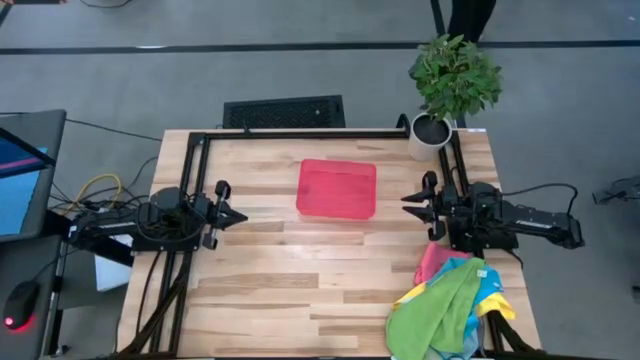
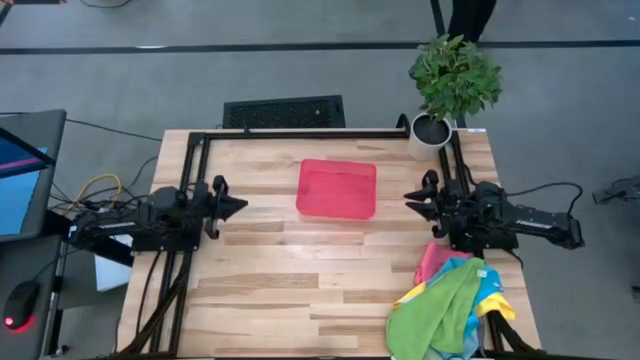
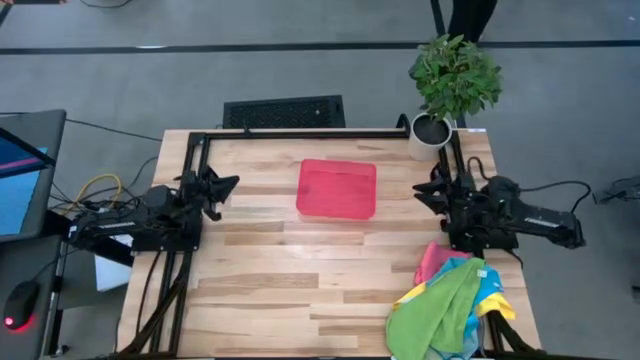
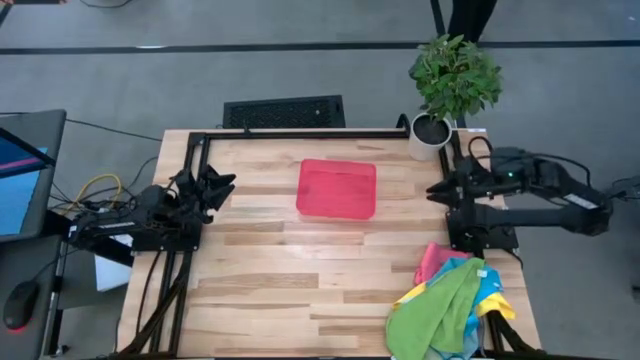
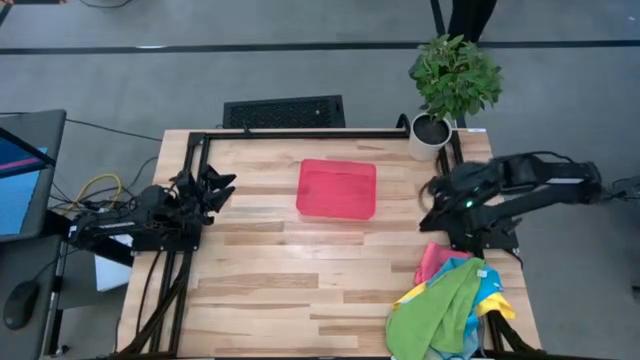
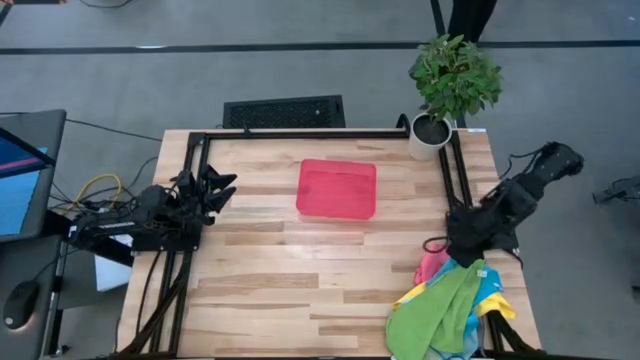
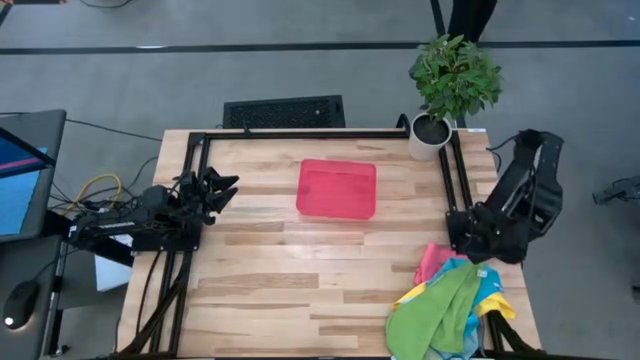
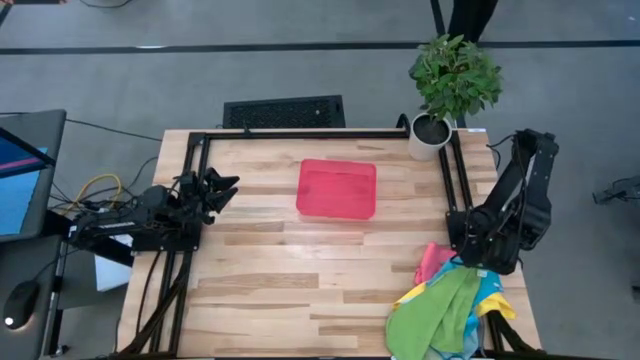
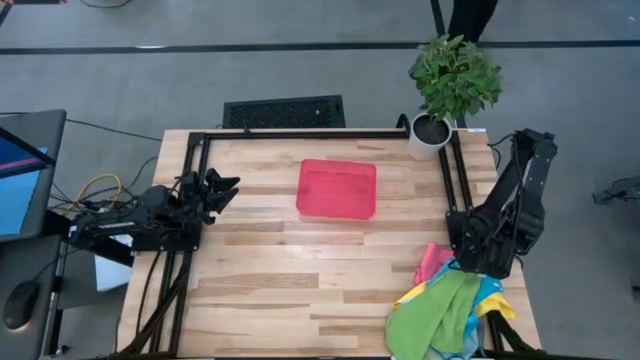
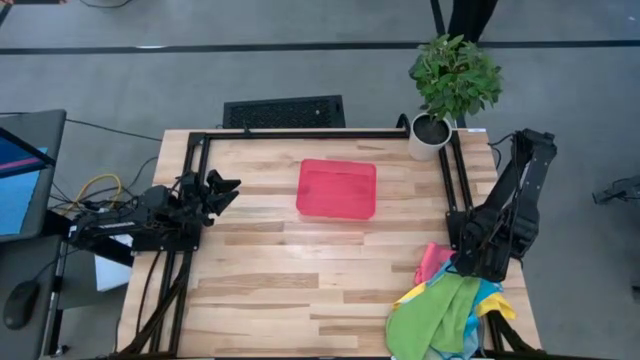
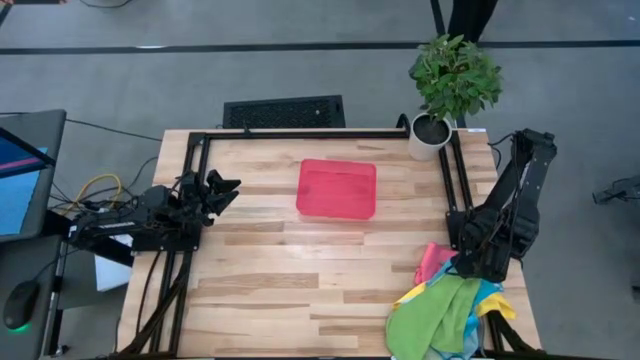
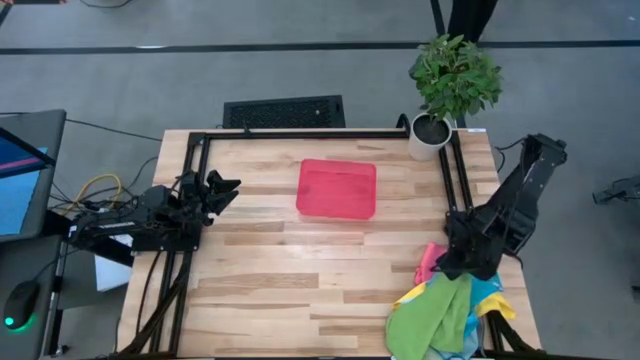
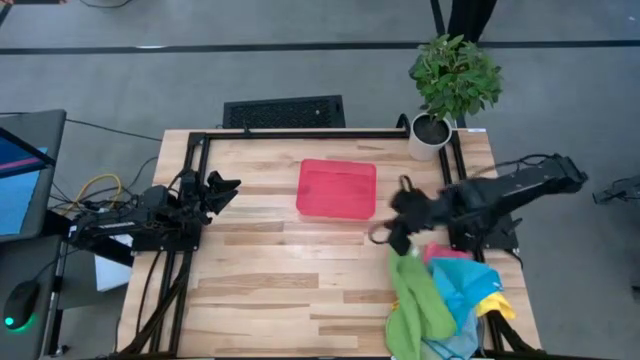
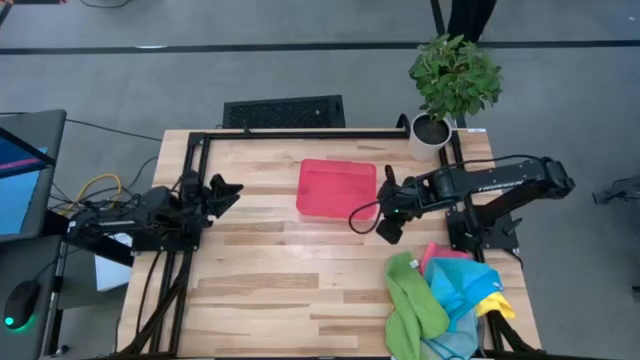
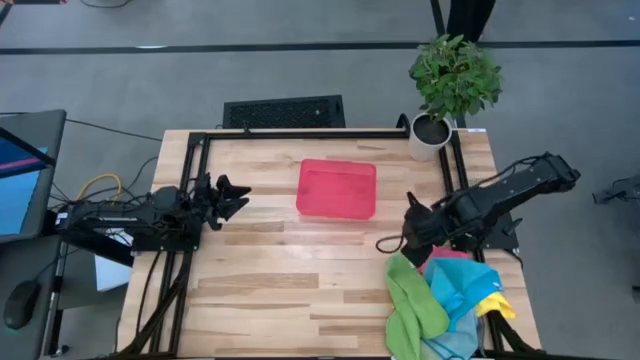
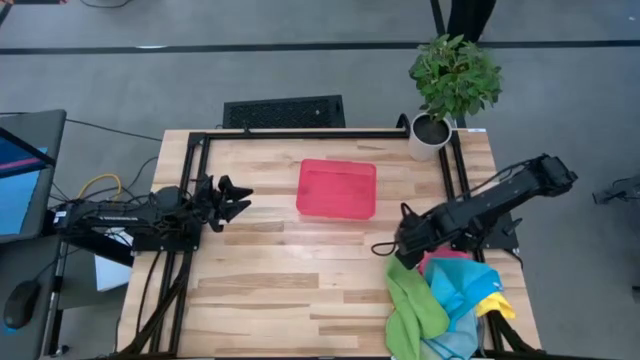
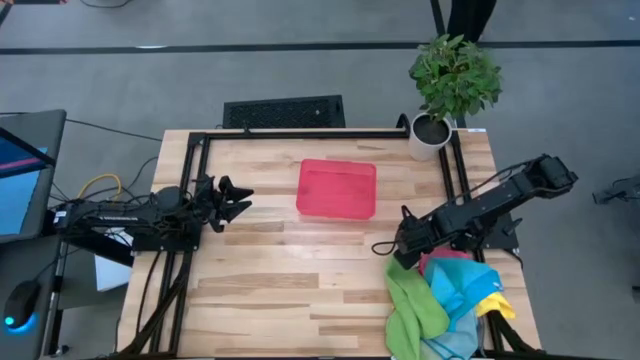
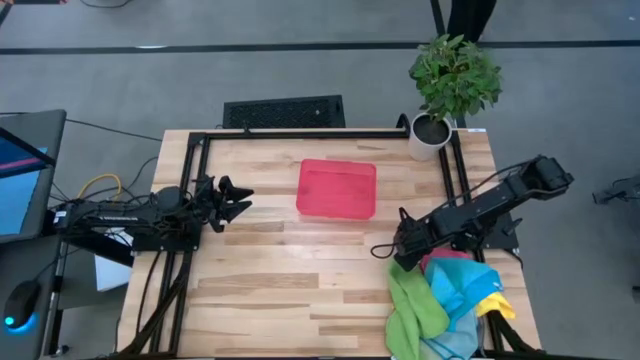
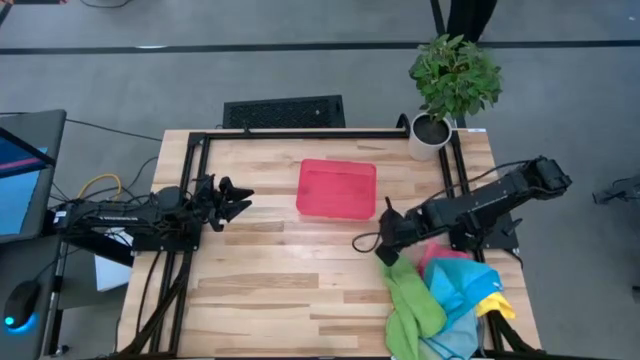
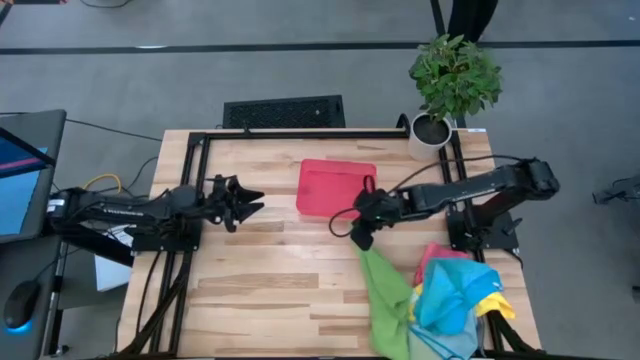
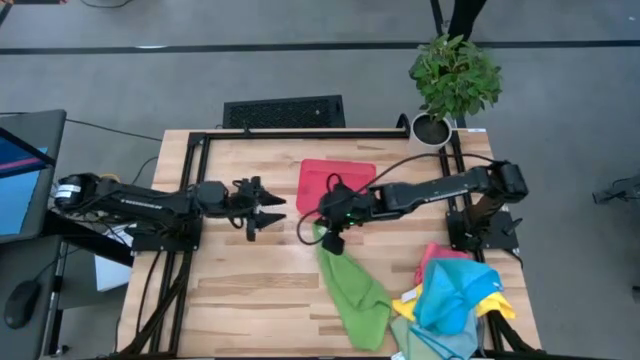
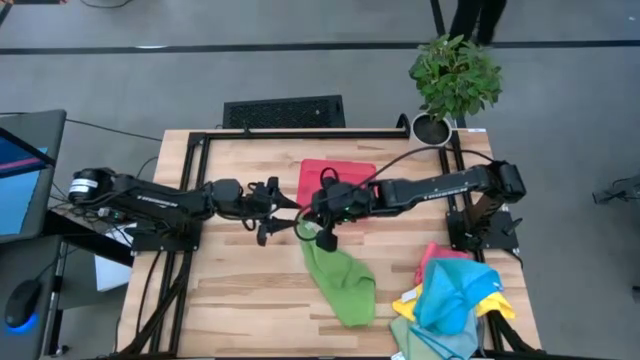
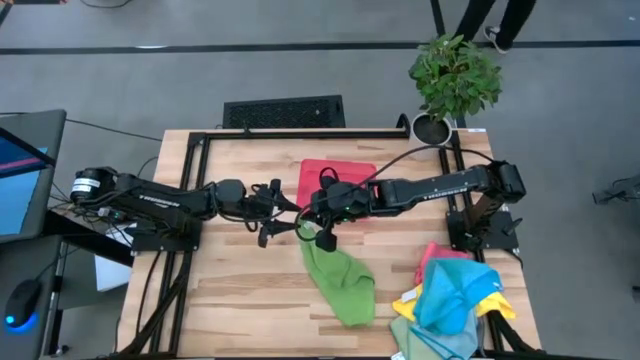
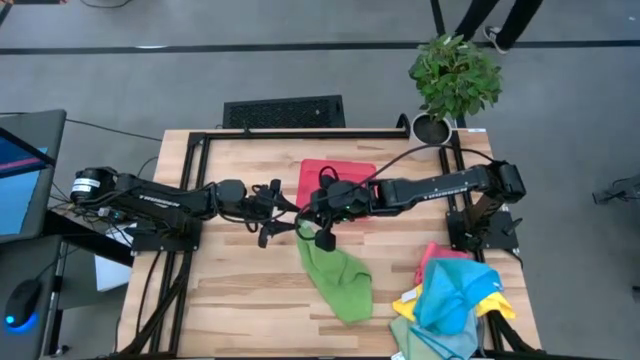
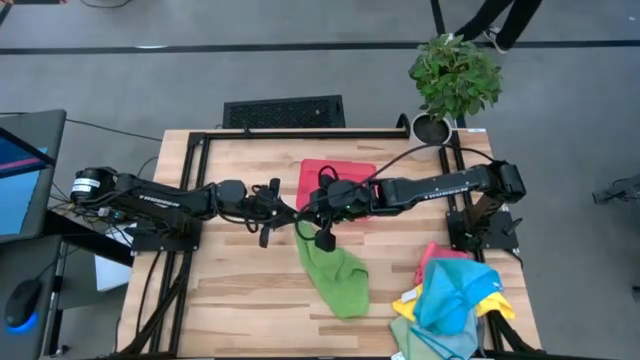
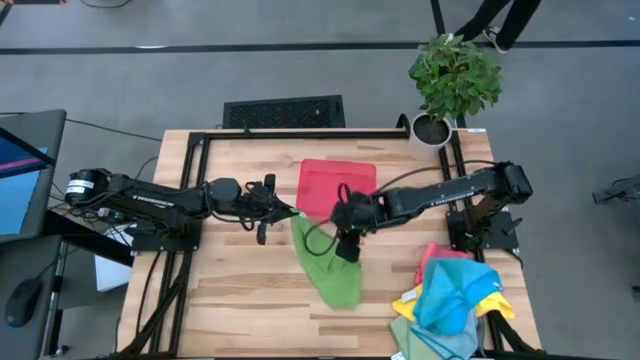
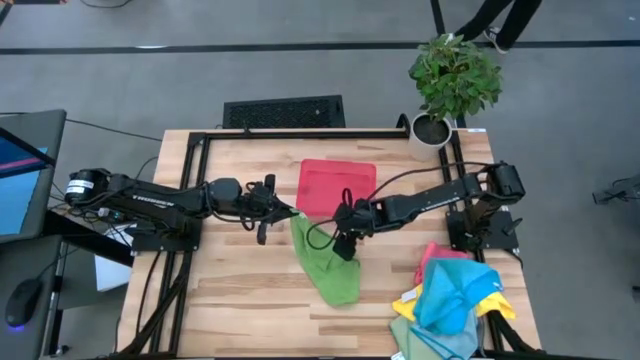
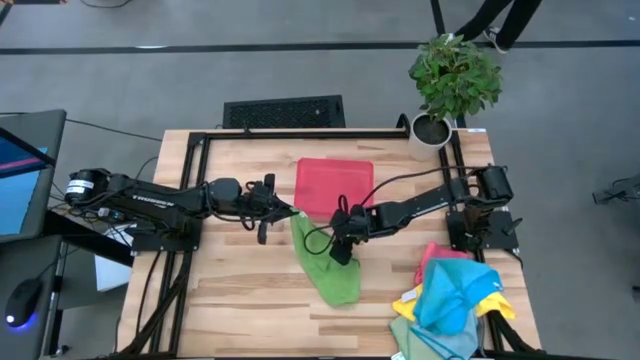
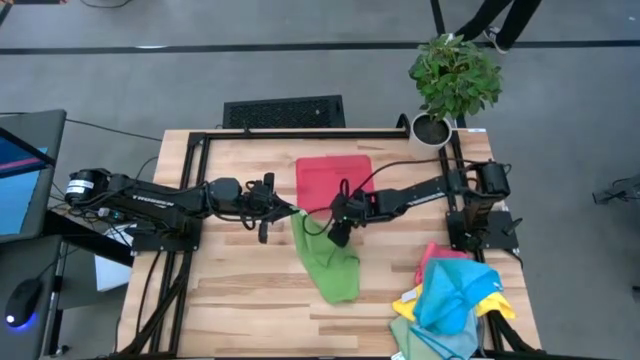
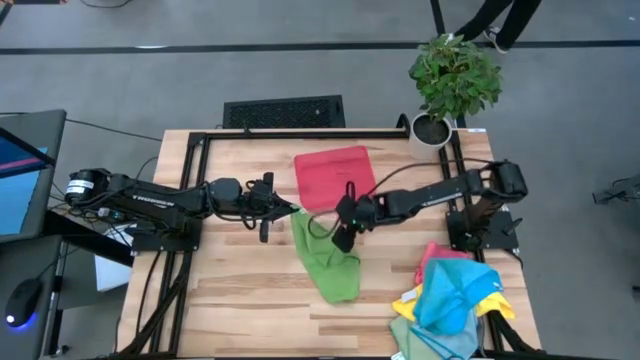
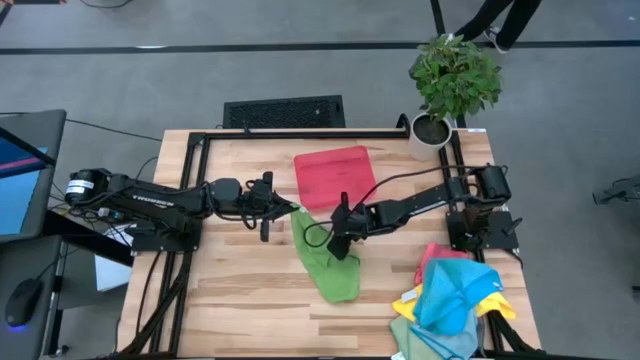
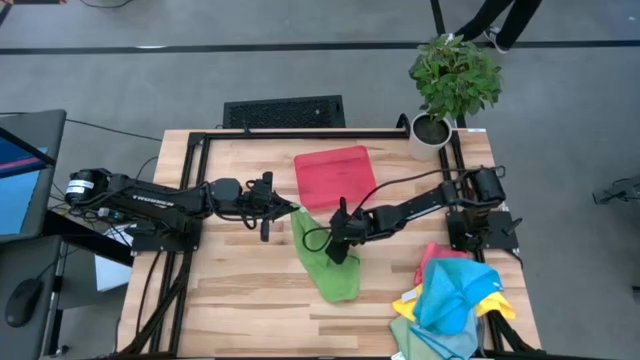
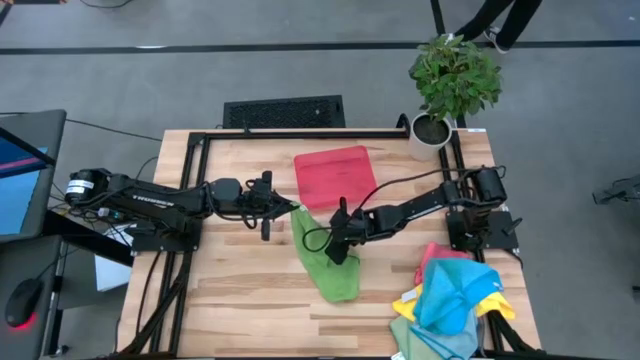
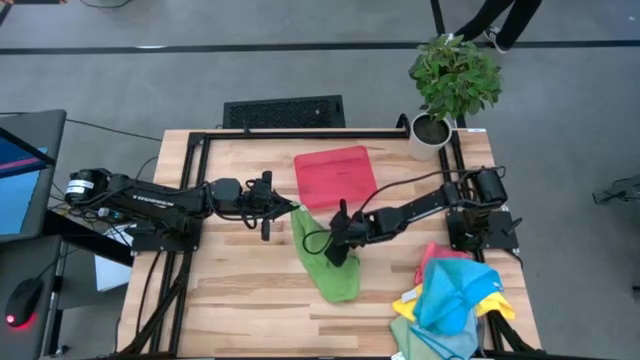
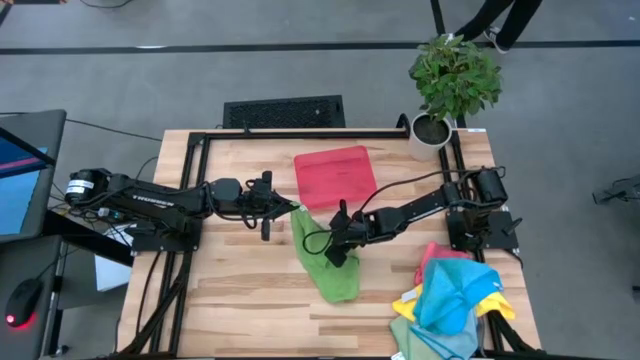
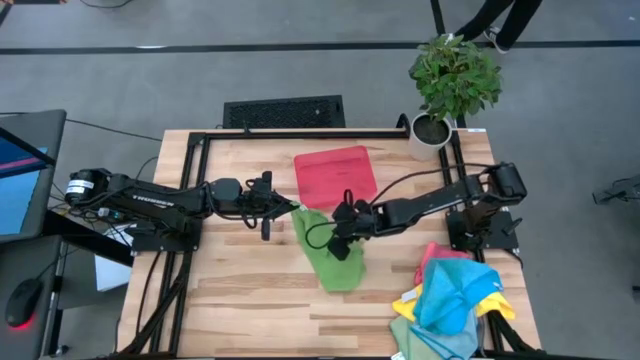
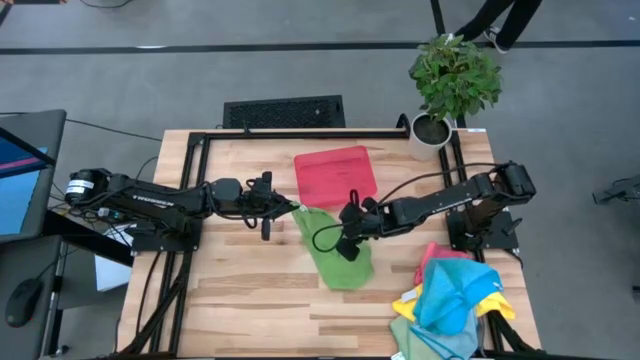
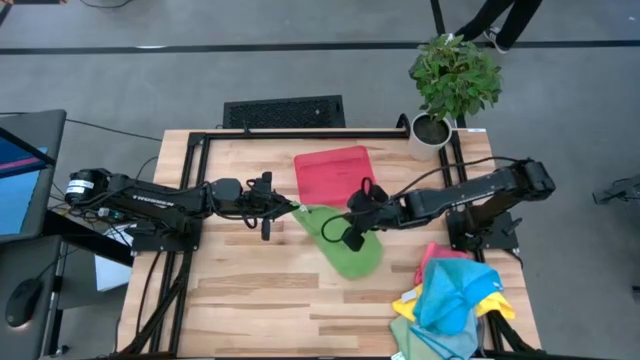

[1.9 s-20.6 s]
Task: Fold microfiber towels
Fold the green microfiber cloth
